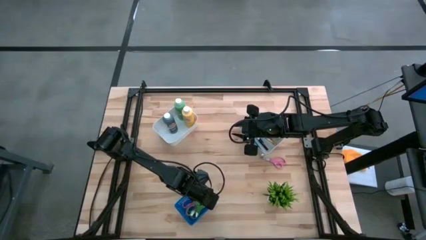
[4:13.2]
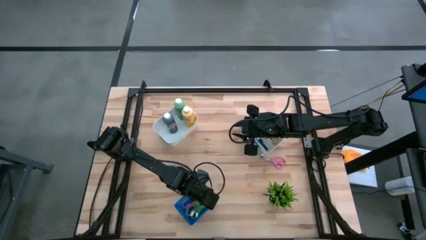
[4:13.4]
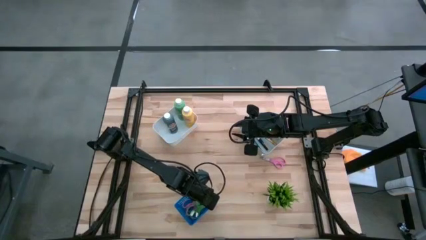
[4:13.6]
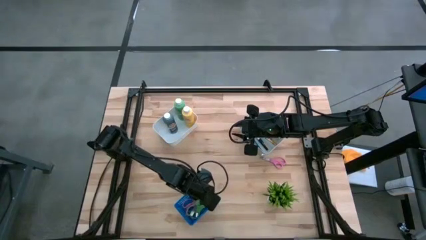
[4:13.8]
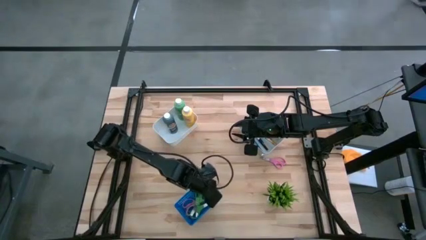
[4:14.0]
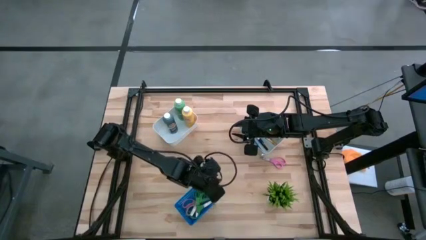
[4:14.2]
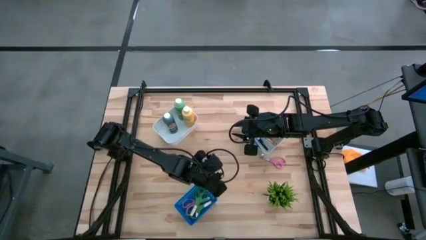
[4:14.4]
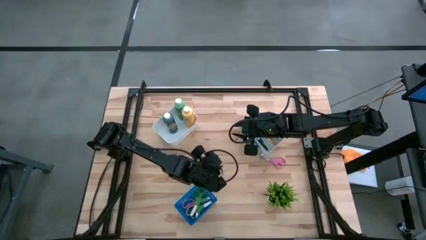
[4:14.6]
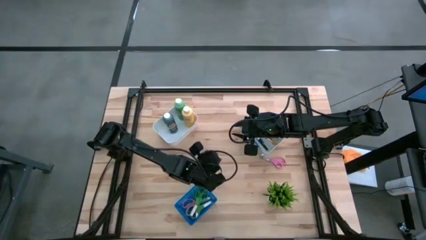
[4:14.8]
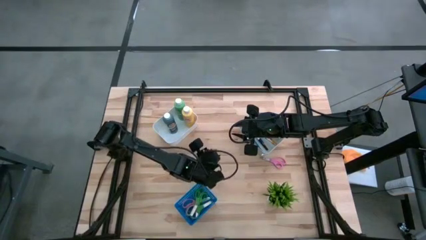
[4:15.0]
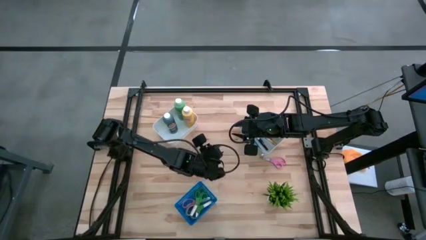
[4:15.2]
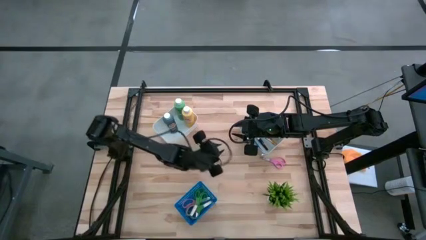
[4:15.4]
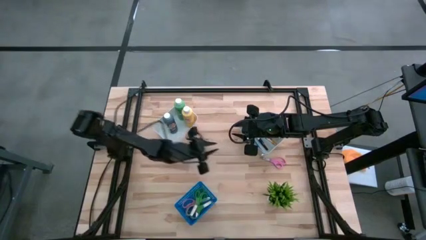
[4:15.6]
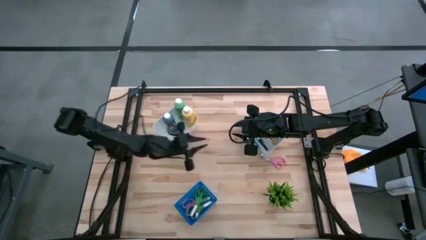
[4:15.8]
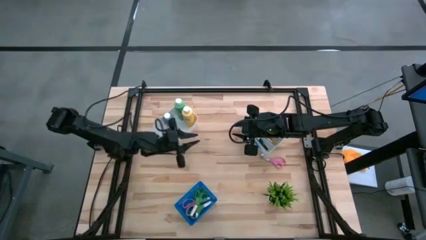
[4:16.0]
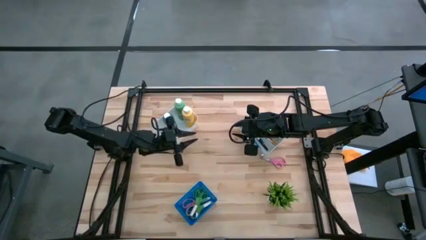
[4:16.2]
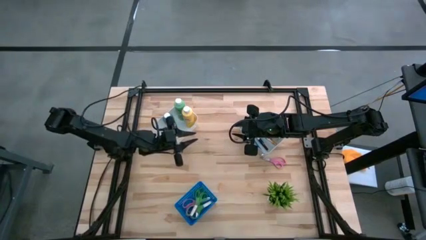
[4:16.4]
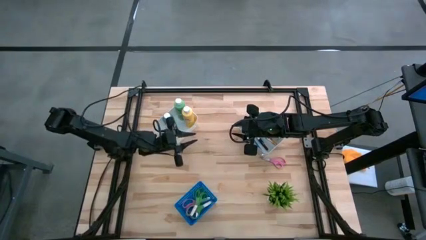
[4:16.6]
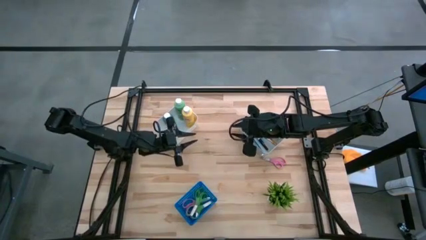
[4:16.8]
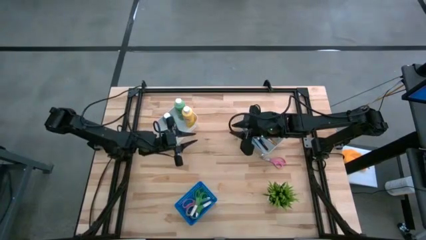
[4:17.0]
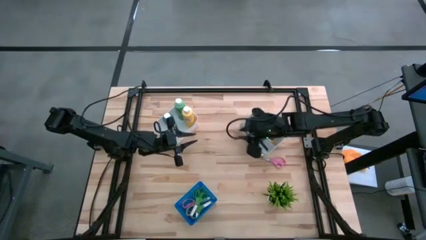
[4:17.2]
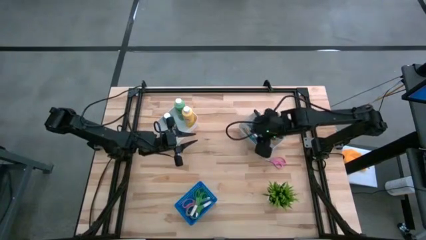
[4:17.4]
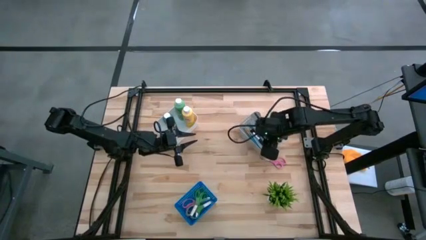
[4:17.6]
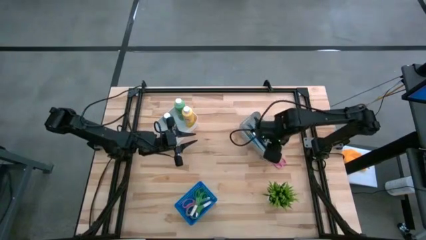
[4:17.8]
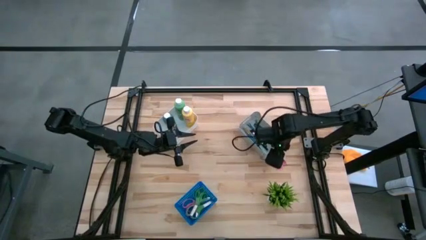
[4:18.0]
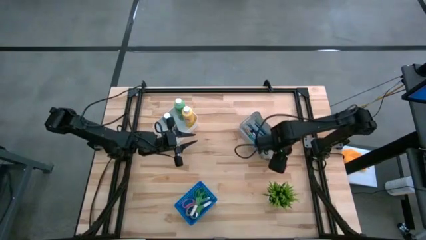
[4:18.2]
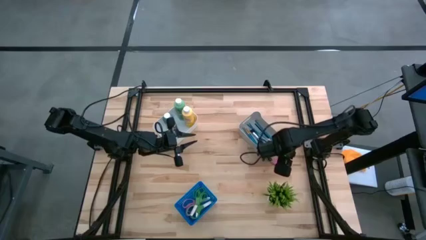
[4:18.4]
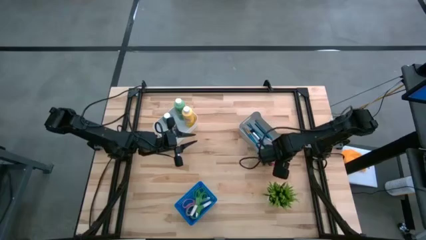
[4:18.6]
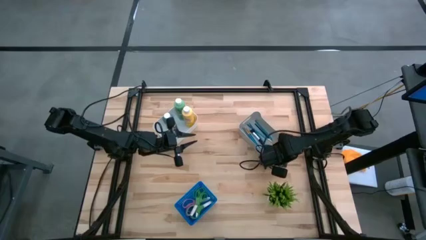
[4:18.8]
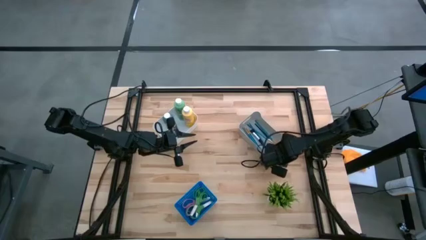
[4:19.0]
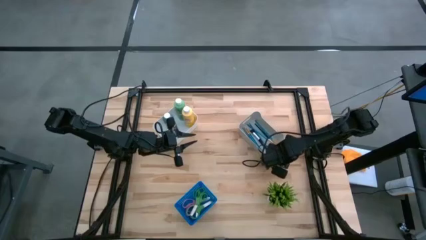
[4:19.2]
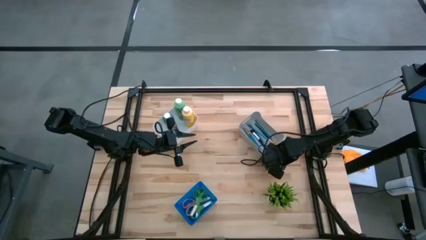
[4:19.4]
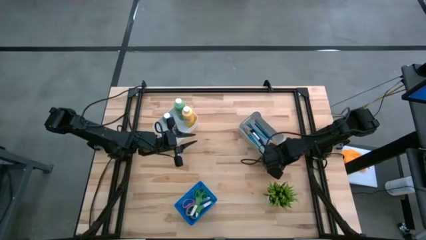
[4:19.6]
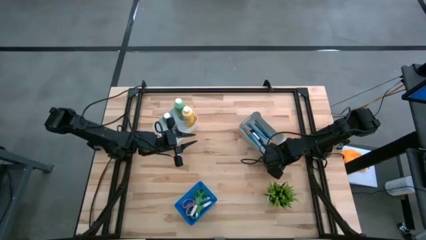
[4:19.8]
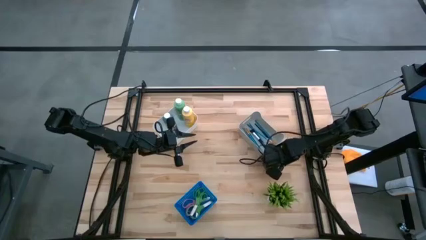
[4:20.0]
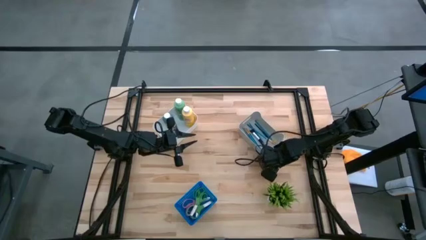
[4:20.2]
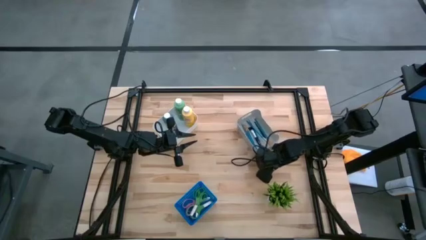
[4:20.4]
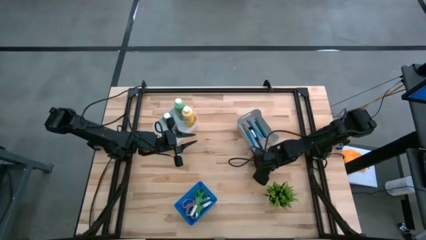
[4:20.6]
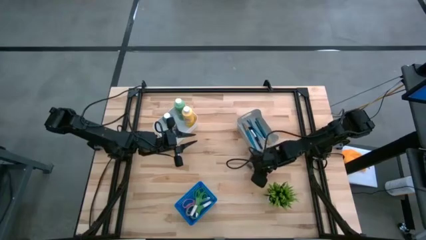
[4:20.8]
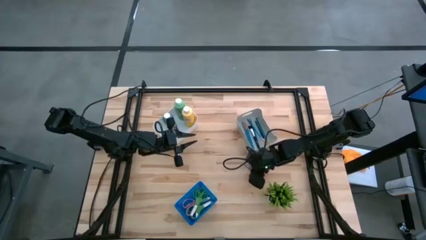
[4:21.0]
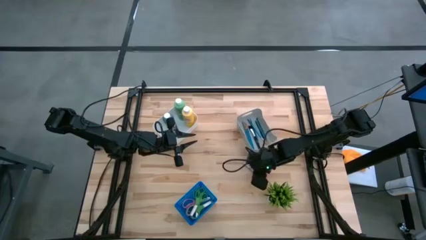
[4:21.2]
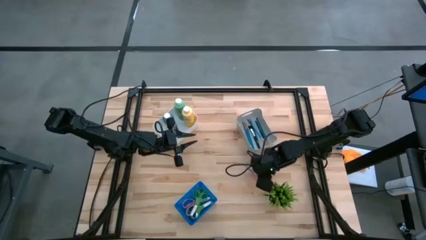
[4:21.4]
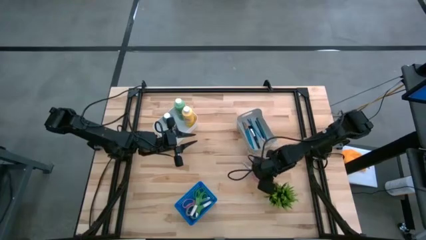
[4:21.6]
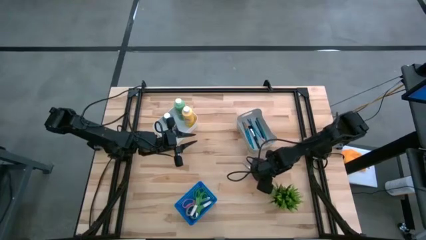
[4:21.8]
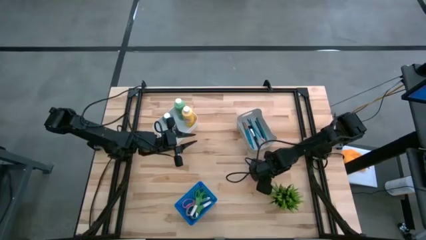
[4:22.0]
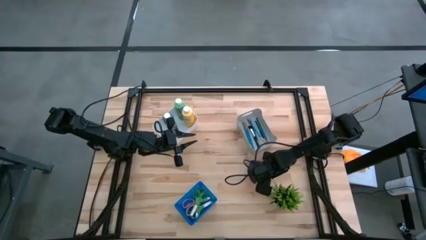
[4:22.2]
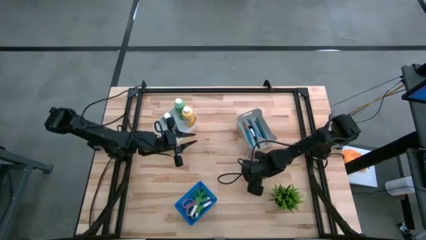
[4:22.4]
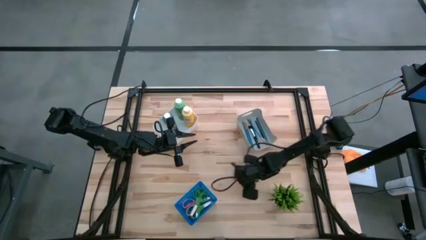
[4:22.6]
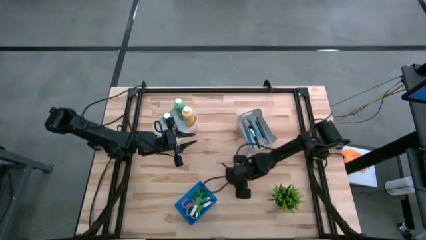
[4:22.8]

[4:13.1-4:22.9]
Task: Pick & Place Paint Supplies
Put the pink scissors into the blue bin

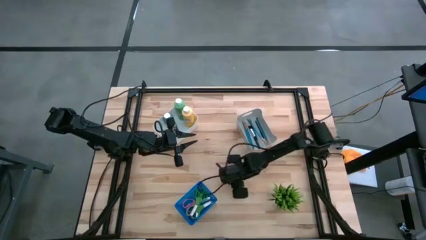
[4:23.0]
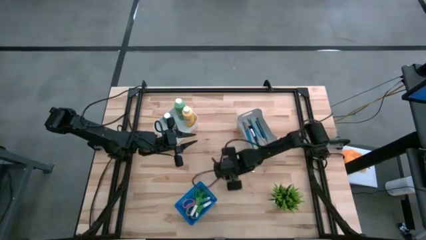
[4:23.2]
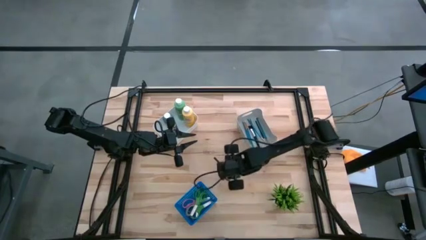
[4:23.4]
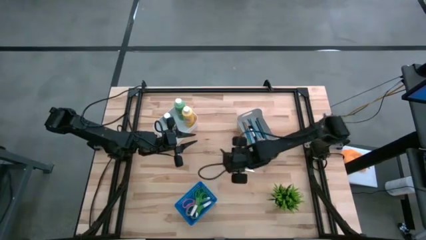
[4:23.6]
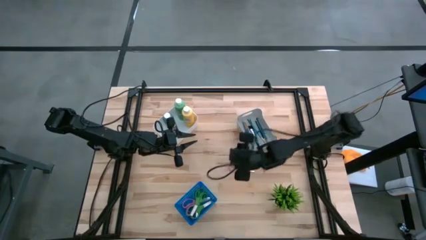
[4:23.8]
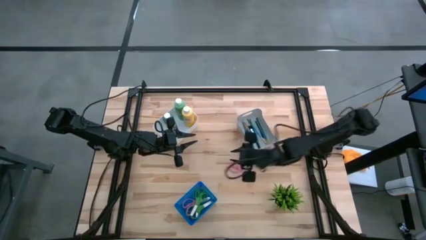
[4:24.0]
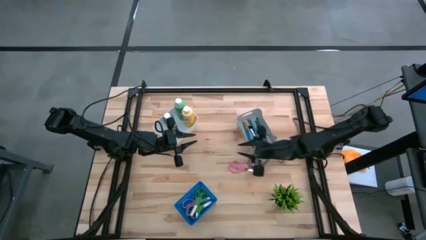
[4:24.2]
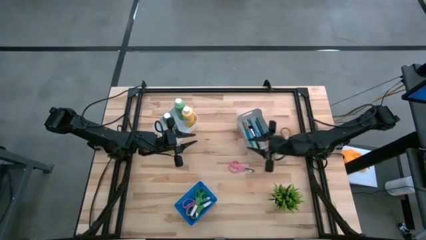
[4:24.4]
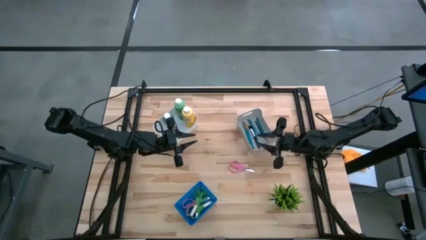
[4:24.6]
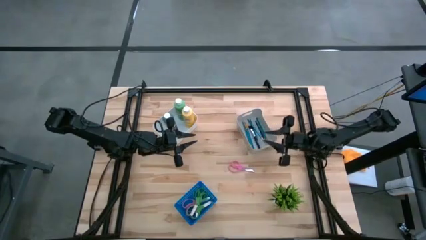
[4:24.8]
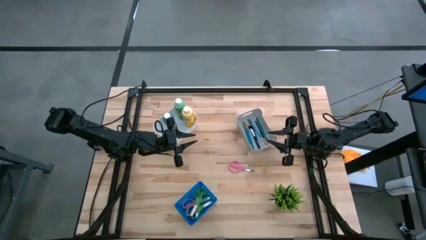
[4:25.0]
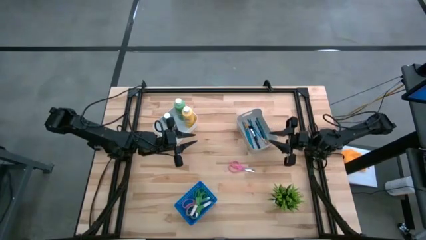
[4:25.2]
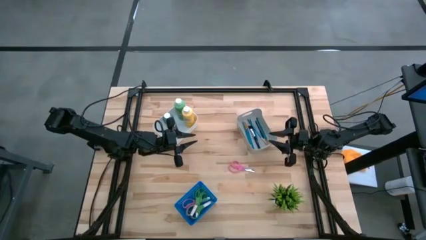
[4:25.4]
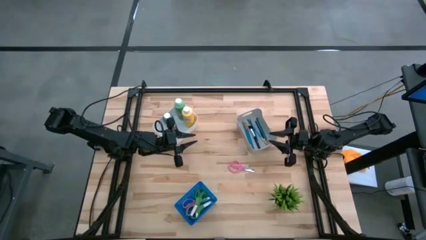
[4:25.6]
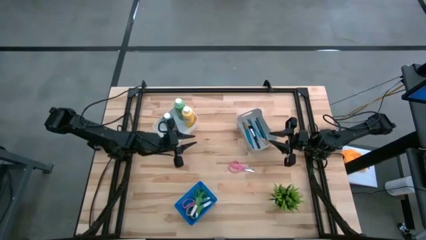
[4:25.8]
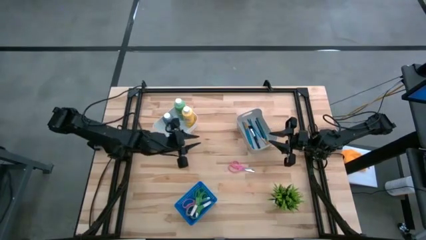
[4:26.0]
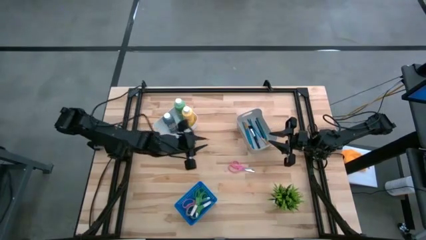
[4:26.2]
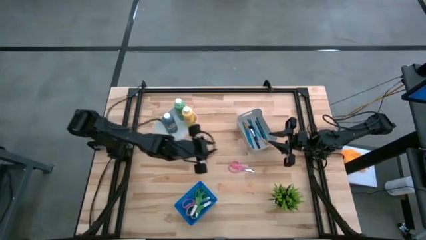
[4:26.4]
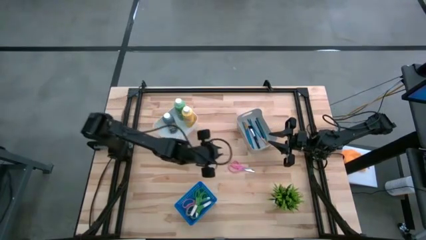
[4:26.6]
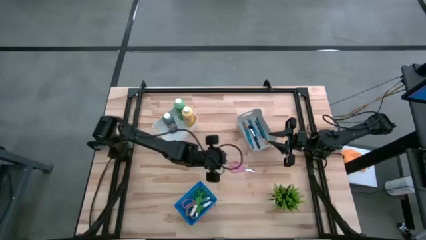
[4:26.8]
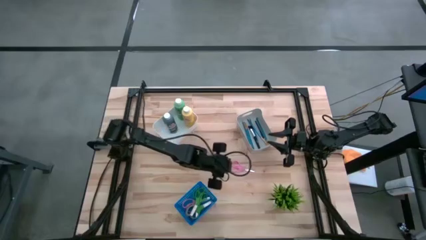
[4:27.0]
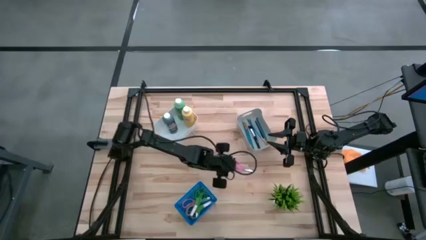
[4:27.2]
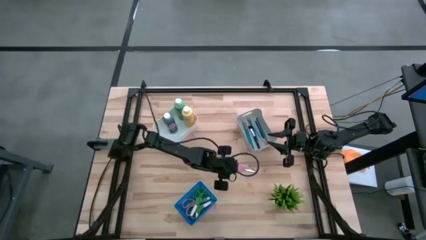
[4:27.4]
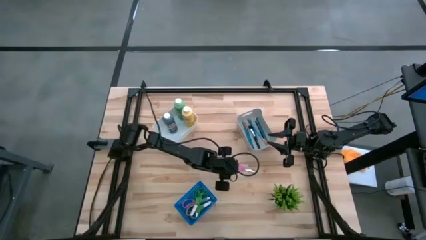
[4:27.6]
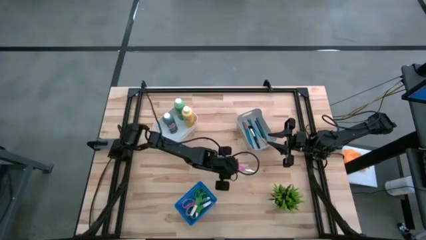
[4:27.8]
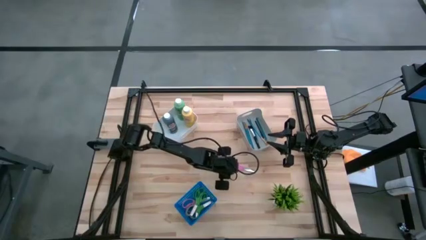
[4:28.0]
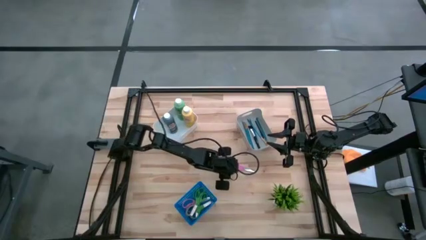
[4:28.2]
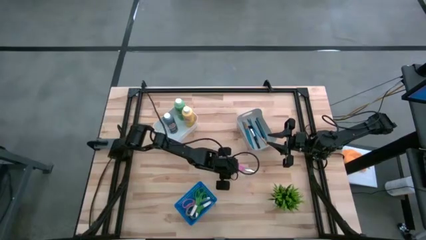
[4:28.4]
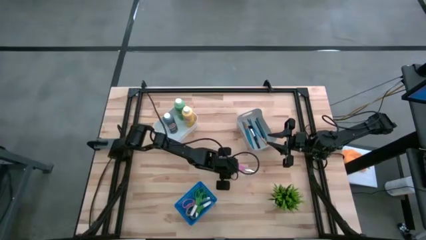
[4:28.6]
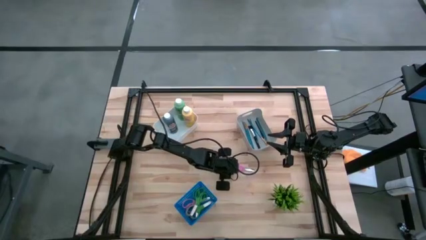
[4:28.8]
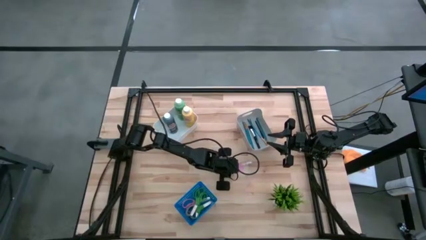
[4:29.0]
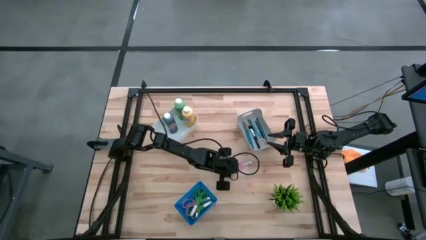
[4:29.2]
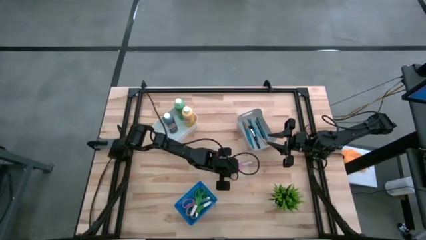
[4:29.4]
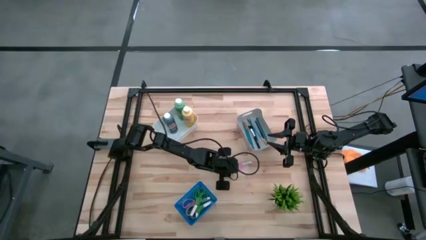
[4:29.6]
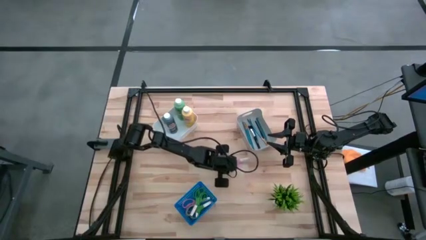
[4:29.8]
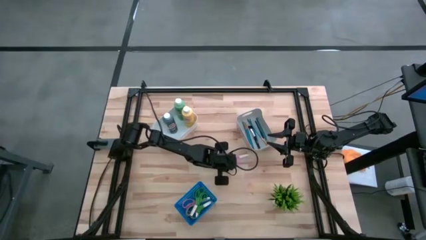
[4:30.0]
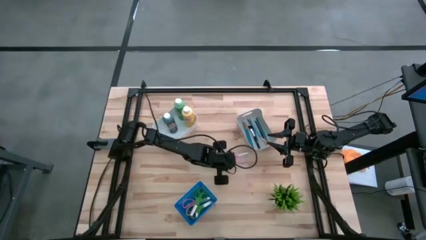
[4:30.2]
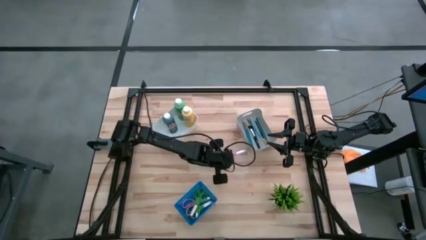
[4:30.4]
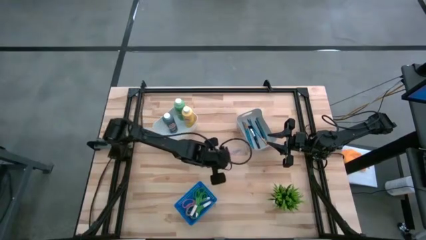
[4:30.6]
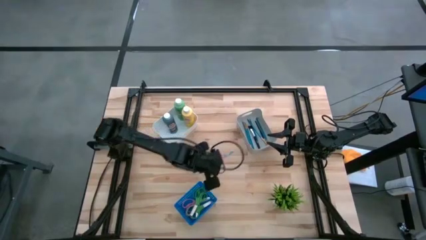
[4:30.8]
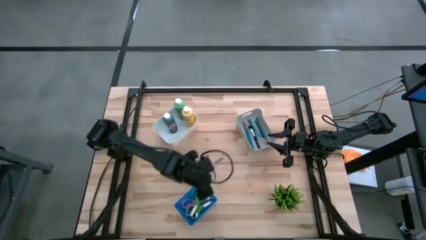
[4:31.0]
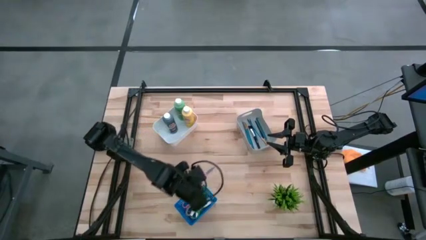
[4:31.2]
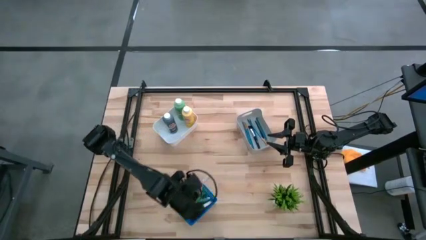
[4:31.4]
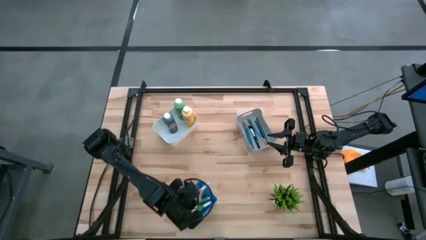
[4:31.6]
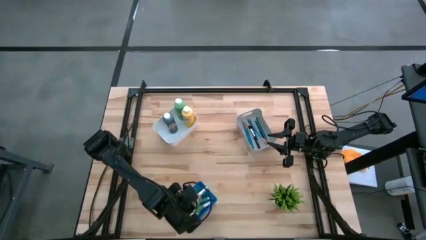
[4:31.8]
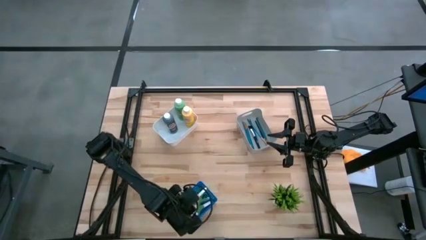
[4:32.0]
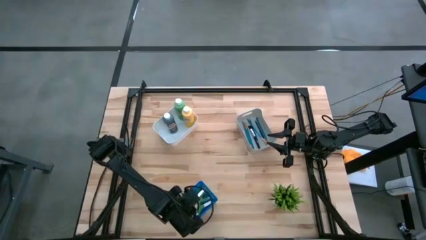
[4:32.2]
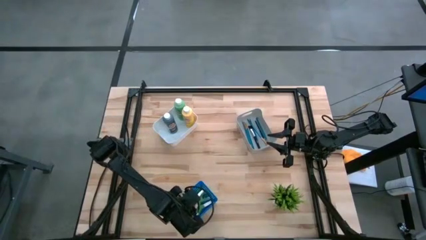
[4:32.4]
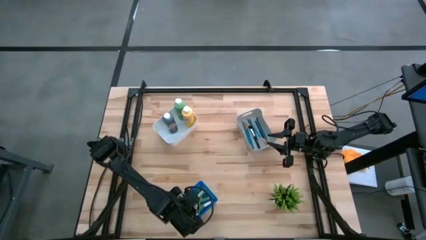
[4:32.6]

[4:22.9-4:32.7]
Put the pink scissors into the blue bin
